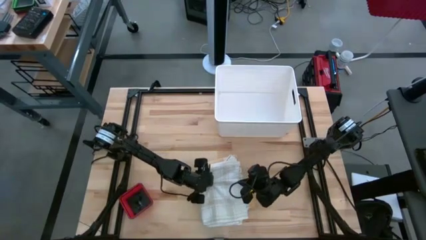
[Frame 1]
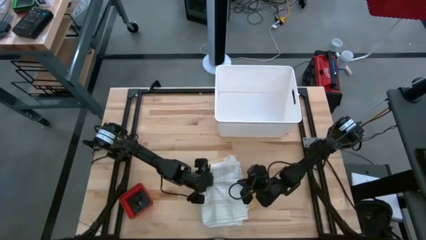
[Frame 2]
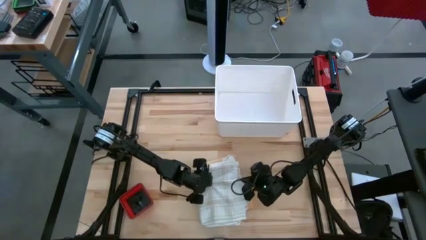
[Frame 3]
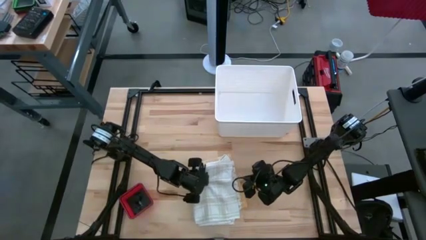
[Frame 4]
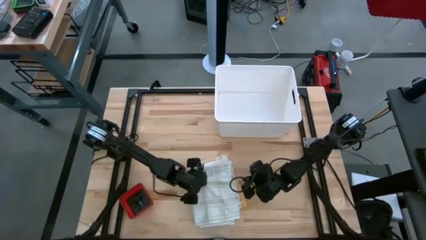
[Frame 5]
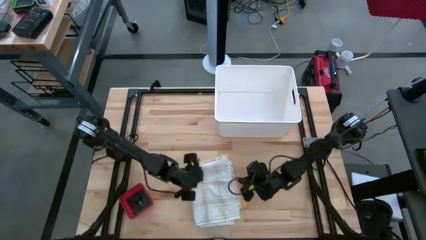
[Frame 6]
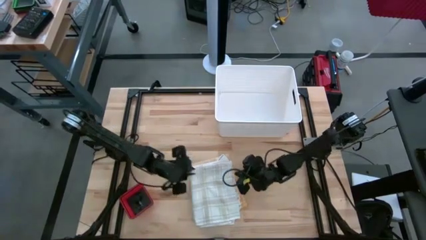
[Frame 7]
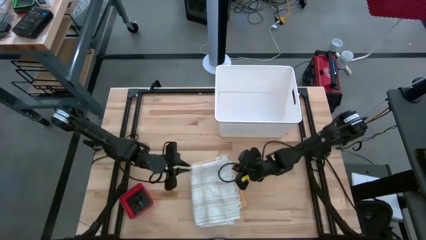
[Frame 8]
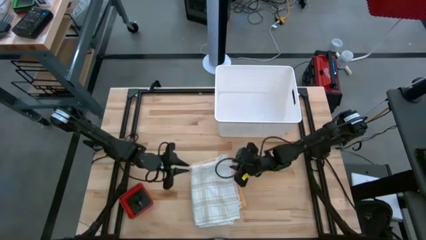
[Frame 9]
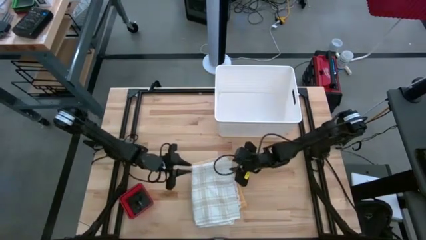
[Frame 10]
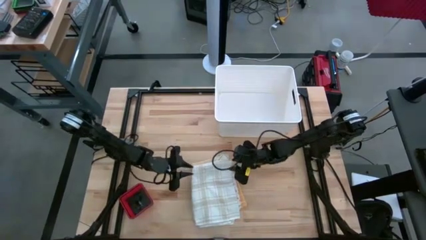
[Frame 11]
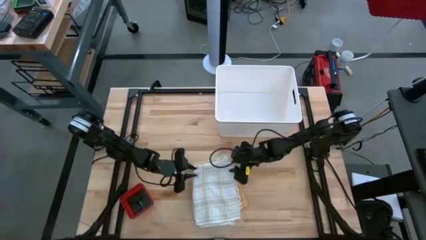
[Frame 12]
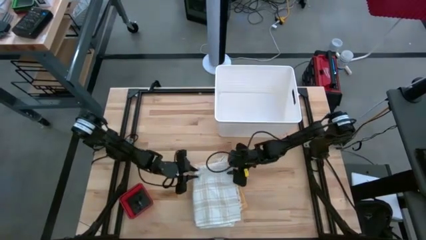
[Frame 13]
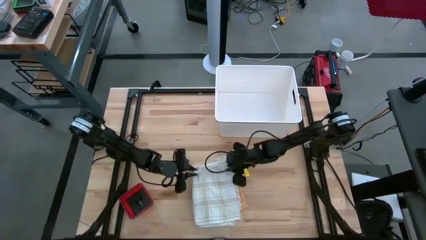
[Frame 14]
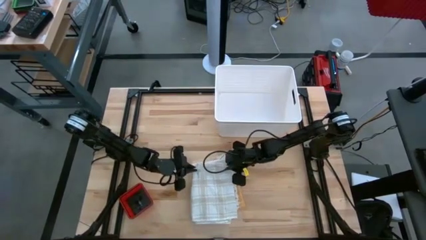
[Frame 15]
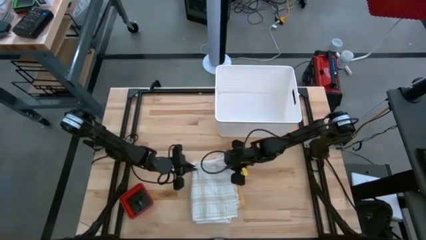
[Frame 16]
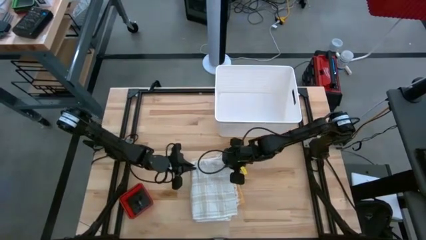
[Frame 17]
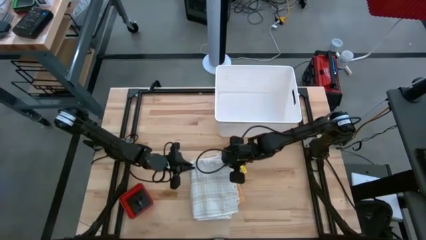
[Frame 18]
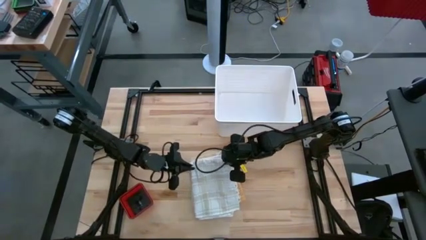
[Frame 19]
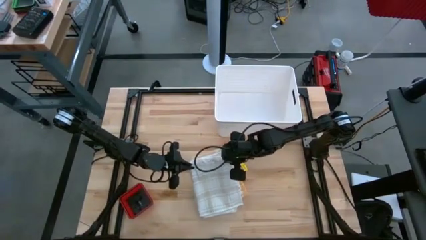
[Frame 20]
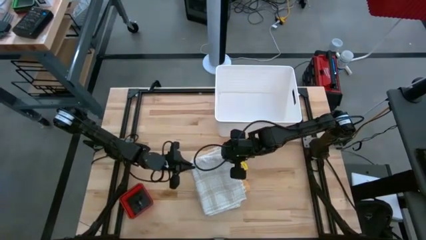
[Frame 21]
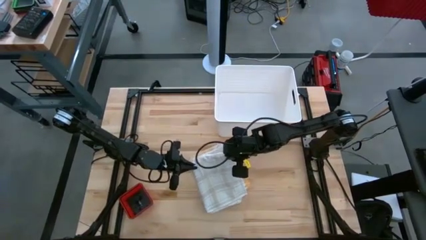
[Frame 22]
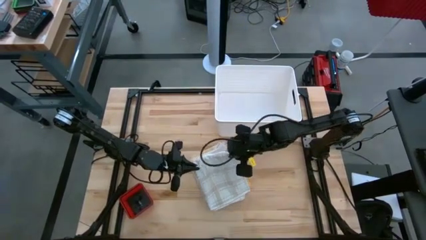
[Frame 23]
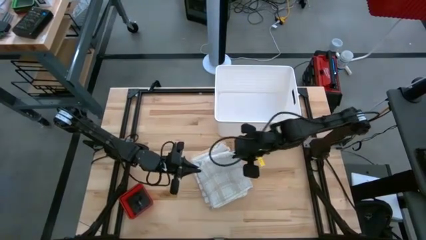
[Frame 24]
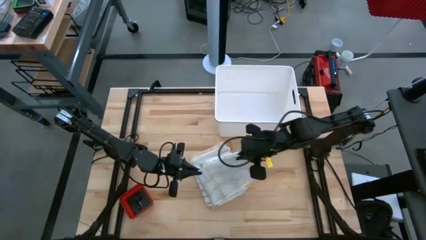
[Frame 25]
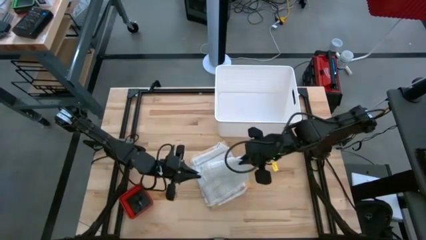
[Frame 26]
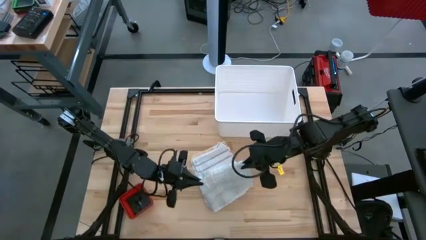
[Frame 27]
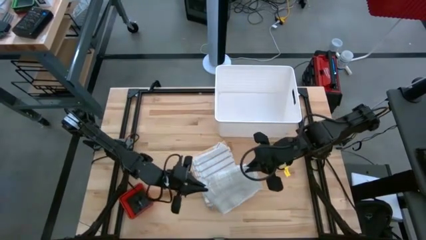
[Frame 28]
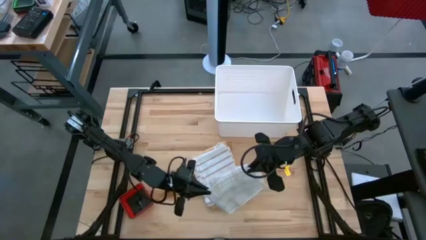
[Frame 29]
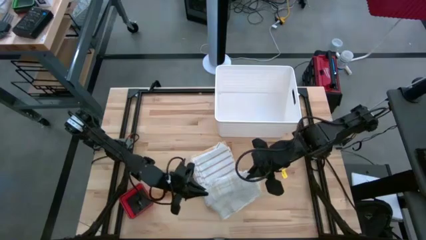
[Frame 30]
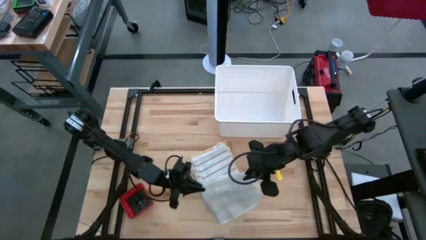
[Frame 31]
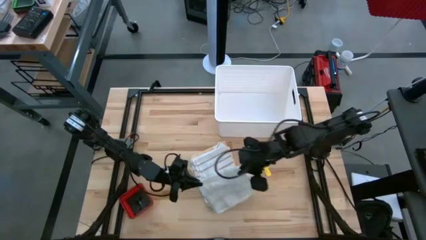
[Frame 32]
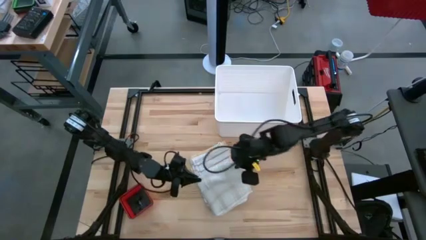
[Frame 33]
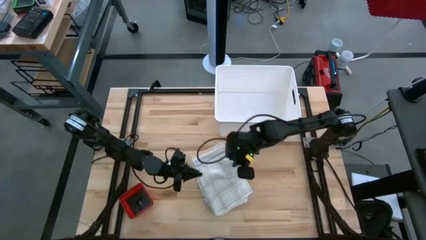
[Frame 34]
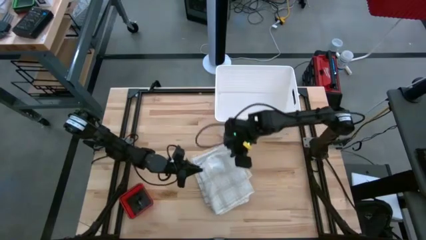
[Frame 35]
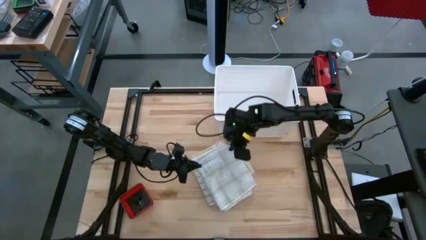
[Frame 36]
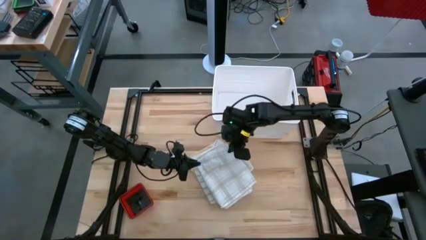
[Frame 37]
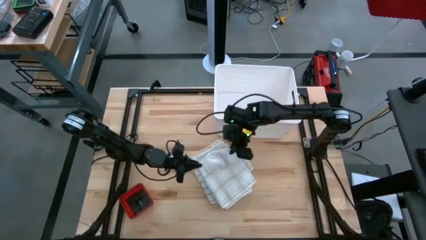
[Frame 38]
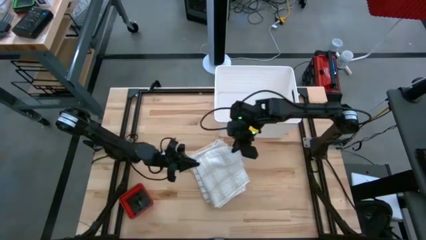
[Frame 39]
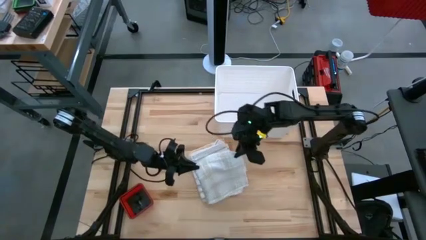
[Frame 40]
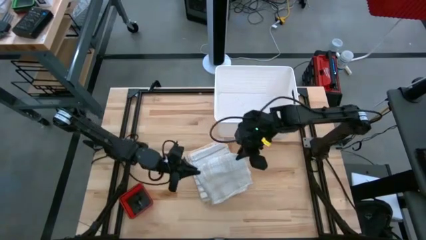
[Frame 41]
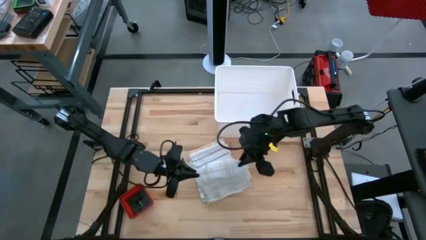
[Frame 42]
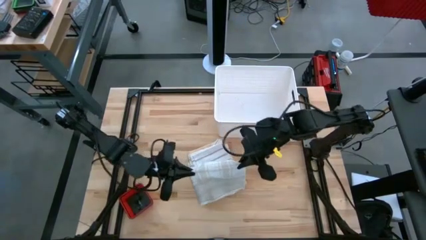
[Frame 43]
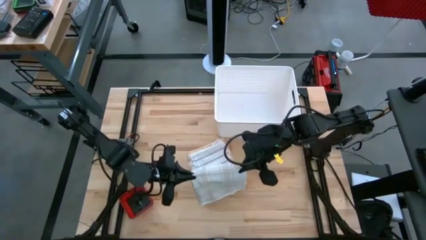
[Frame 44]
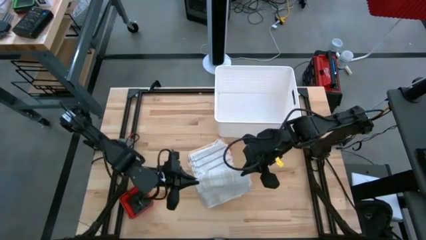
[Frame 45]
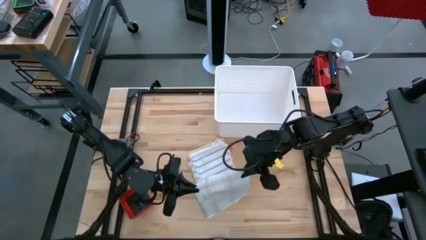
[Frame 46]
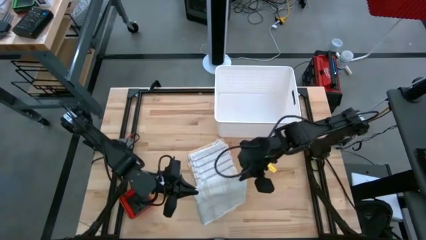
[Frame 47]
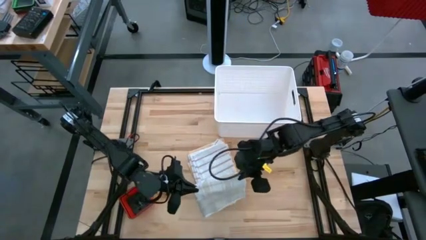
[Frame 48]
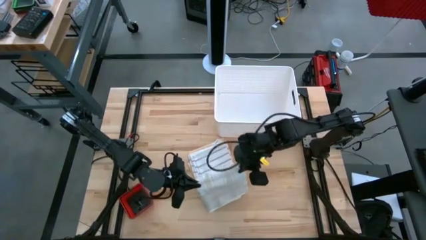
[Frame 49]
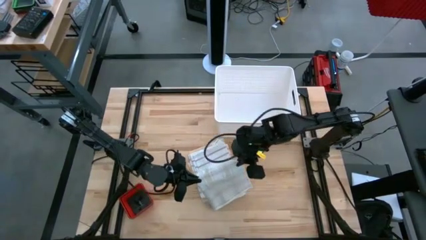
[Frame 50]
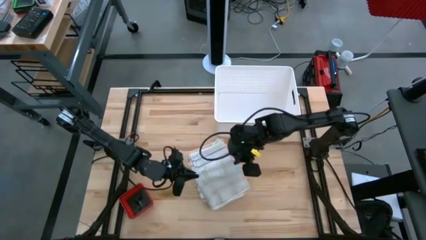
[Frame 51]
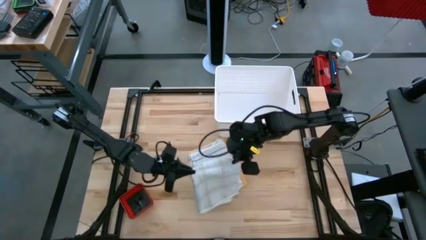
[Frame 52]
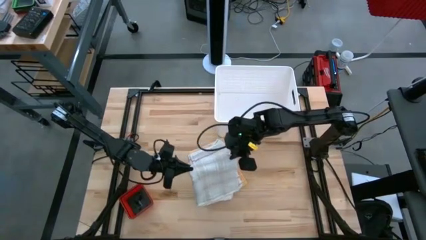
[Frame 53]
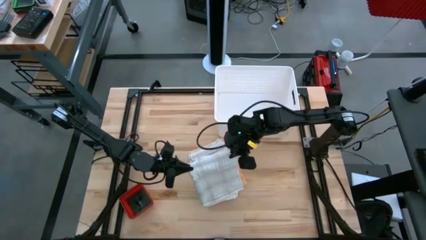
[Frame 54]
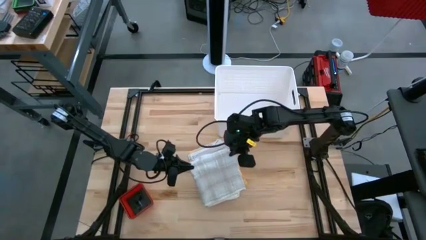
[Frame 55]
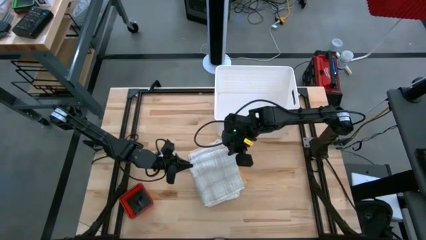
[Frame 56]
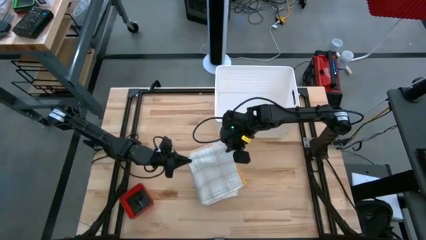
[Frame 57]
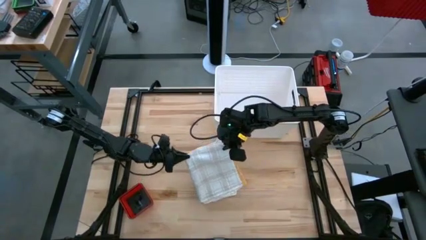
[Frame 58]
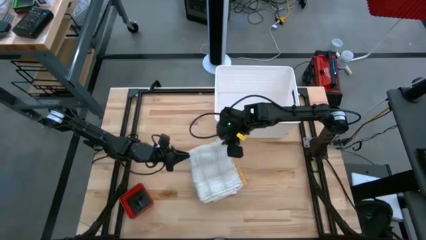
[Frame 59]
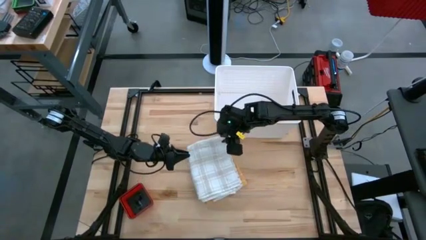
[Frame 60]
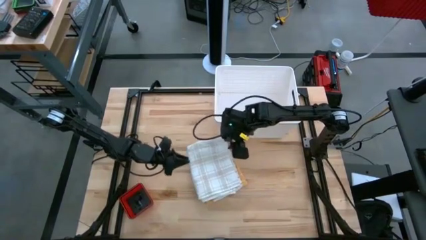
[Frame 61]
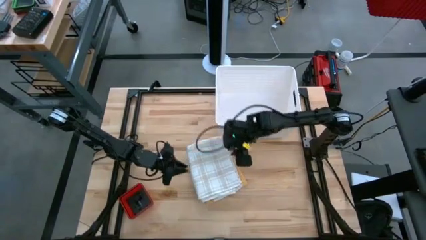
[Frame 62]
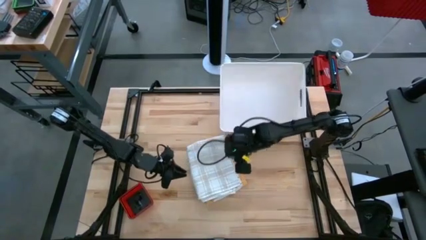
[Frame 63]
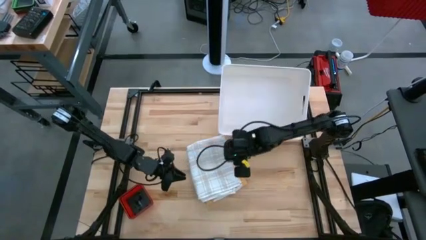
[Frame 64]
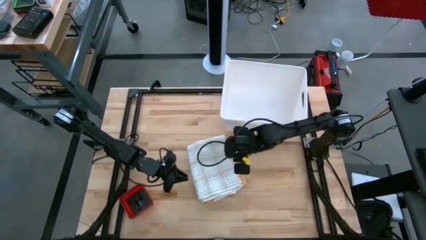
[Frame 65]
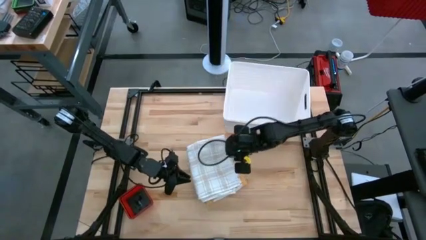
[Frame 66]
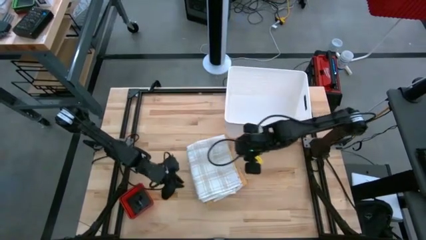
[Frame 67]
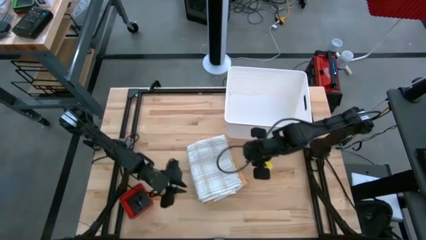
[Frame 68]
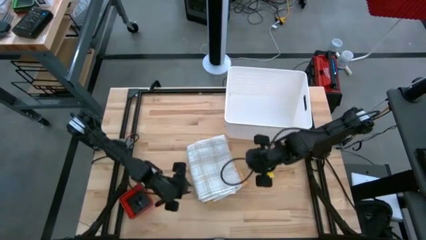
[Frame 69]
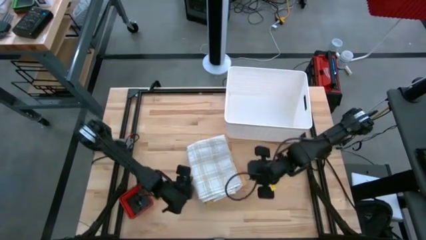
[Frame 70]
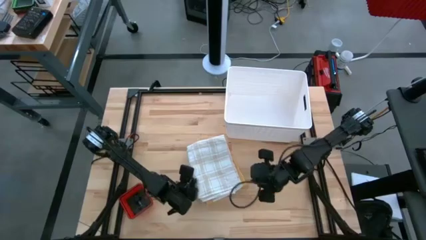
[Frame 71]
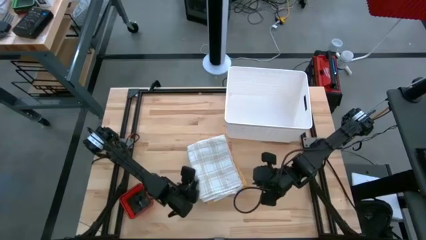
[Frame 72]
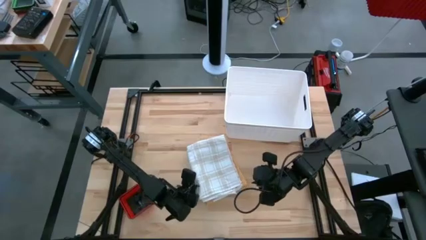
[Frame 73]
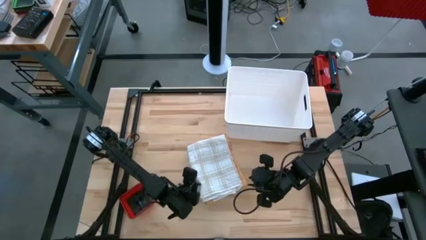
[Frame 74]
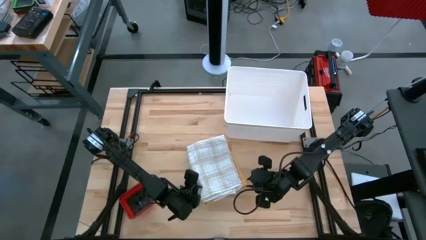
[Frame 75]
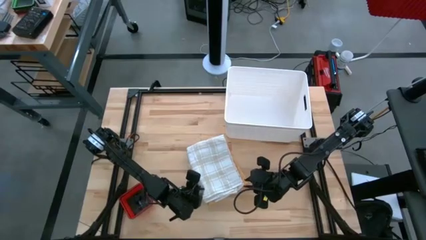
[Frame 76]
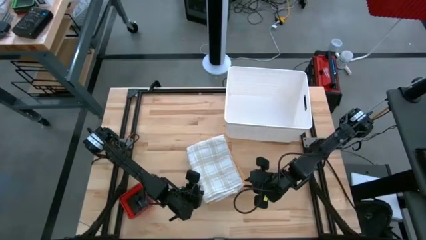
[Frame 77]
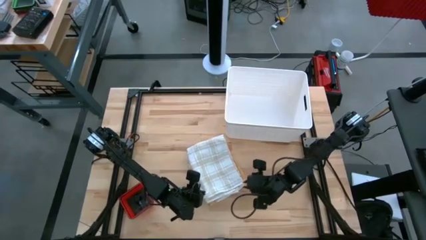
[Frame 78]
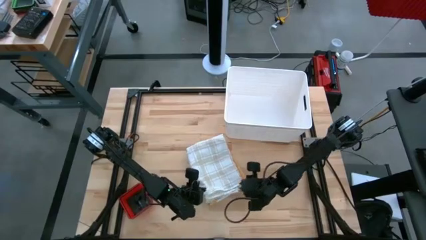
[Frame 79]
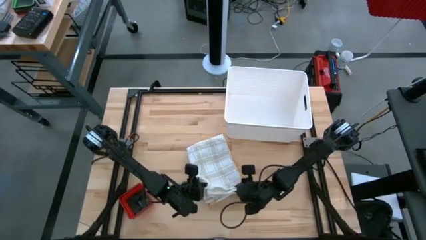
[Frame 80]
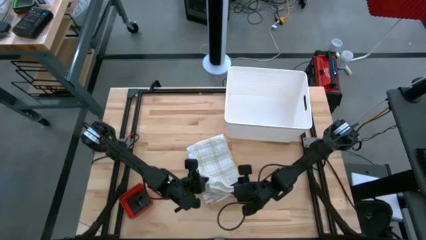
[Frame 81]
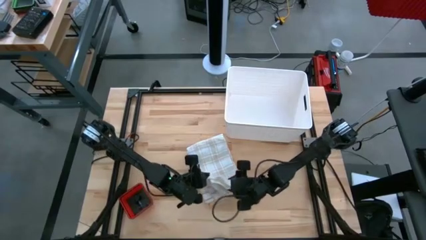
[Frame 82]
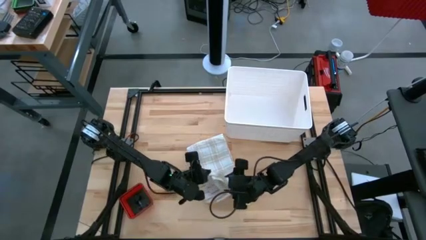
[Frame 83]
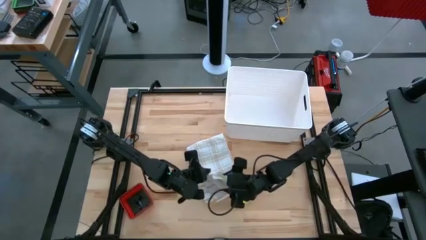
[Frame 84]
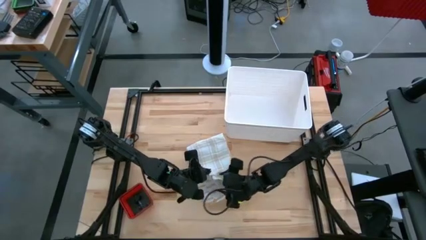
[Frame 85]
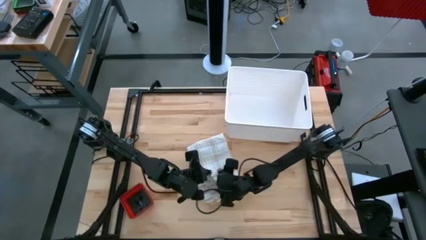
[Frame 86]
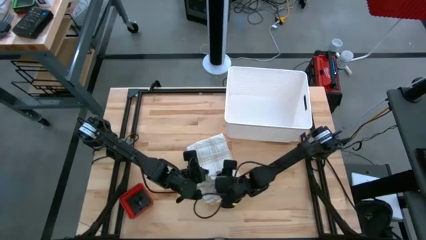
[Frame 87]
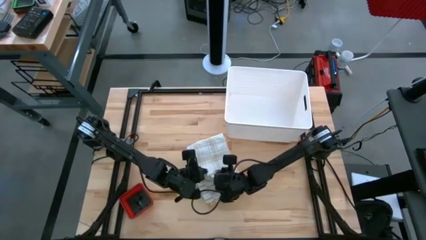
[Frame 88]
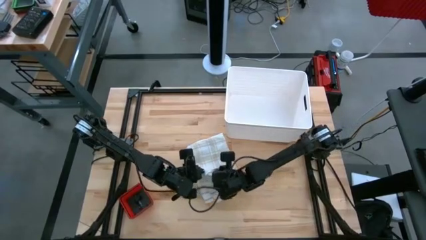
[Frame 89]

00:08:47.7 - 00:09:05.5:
Task: Fold towel
Stack the light gray patterned towel on top of the brown patterned towel
